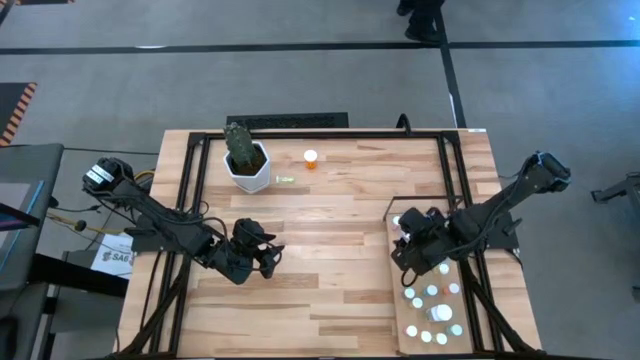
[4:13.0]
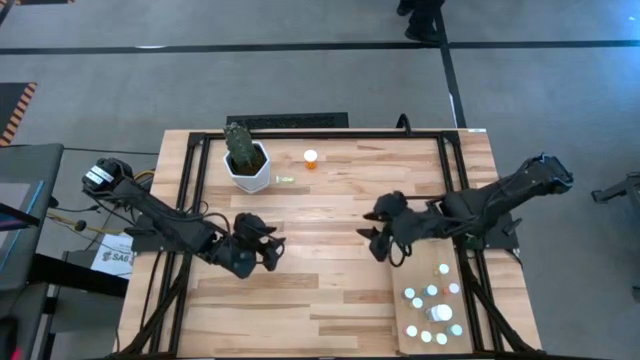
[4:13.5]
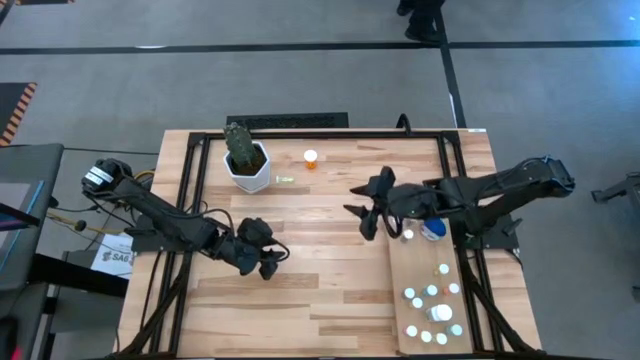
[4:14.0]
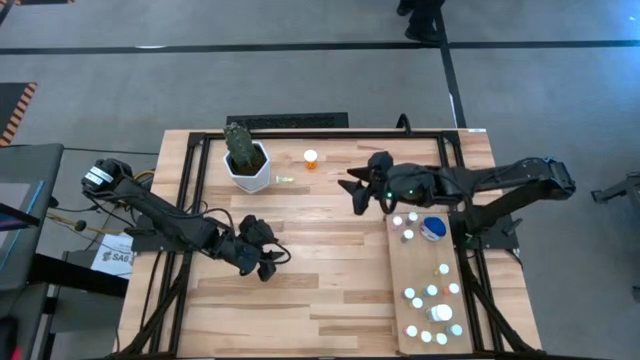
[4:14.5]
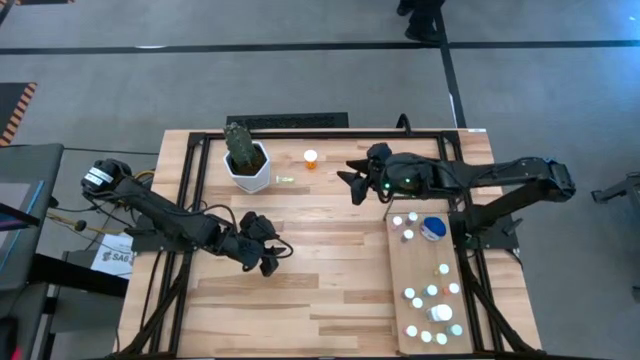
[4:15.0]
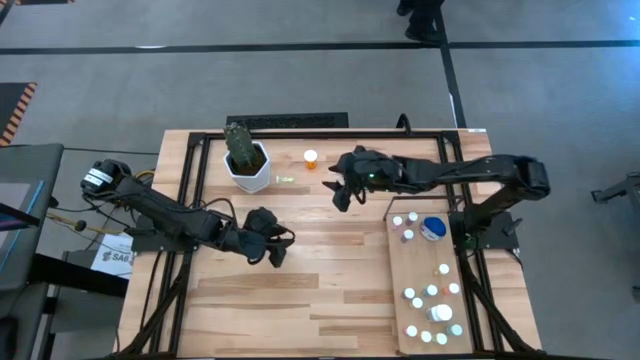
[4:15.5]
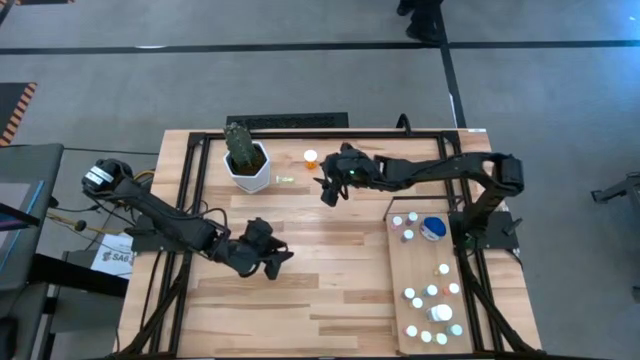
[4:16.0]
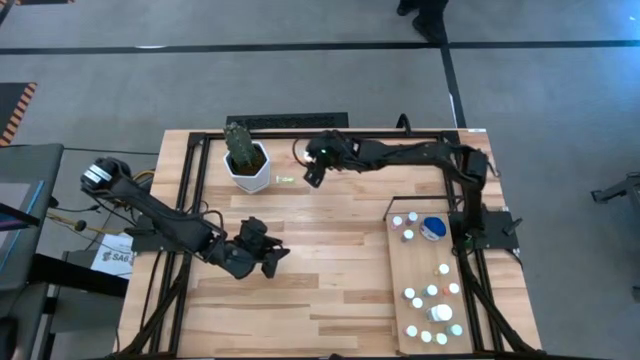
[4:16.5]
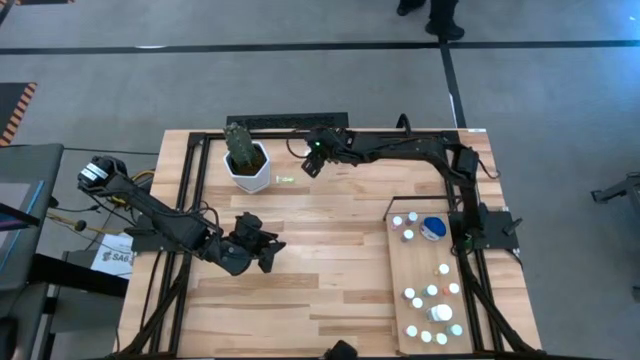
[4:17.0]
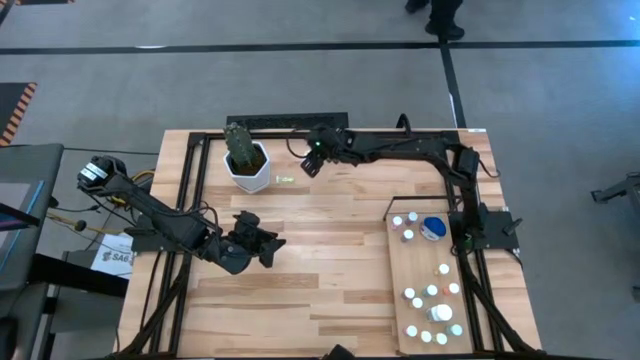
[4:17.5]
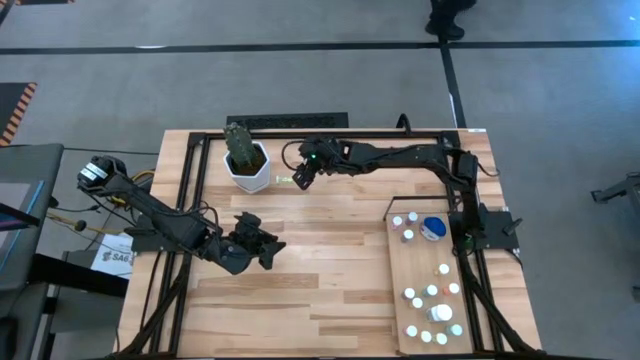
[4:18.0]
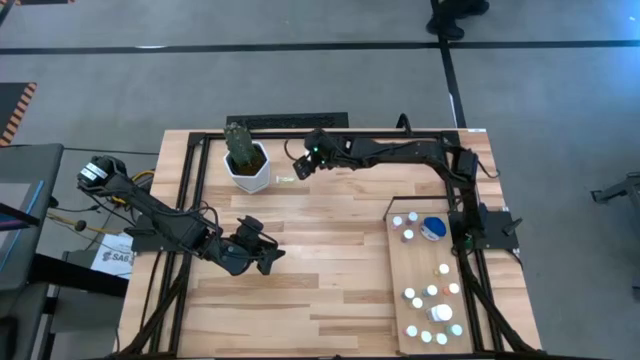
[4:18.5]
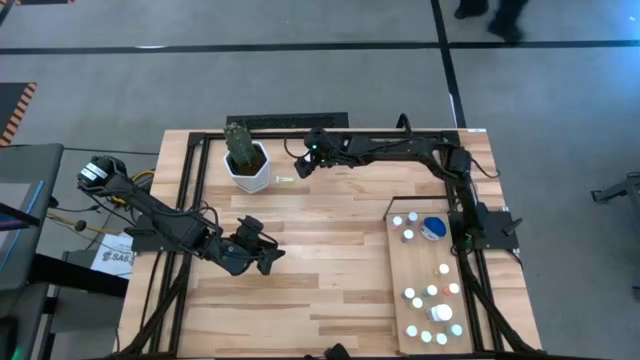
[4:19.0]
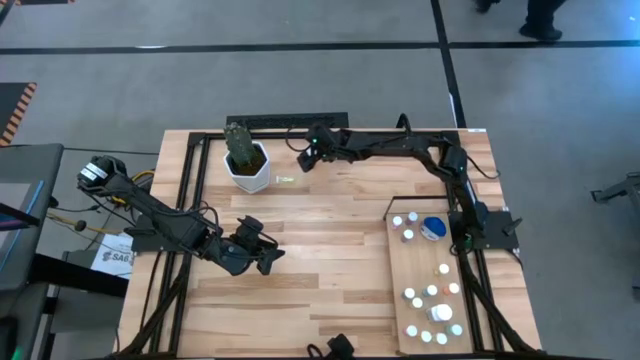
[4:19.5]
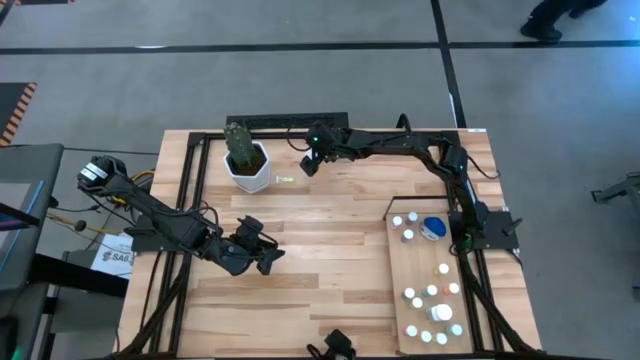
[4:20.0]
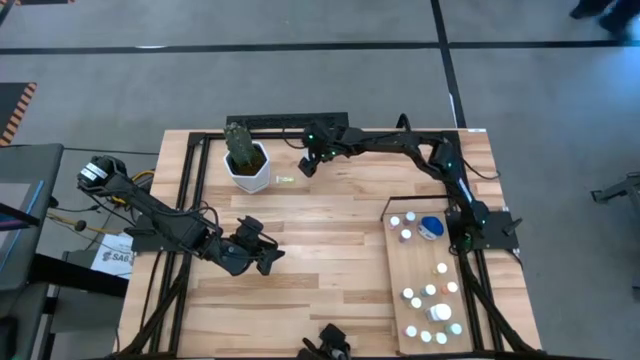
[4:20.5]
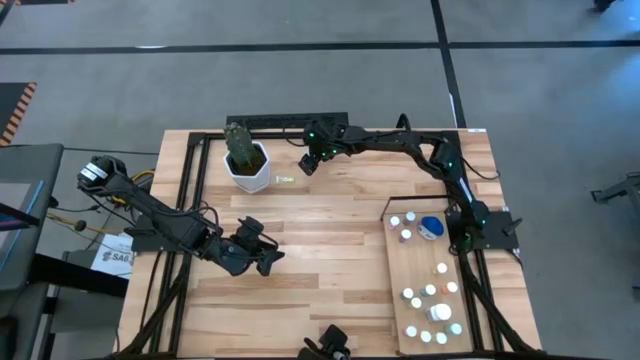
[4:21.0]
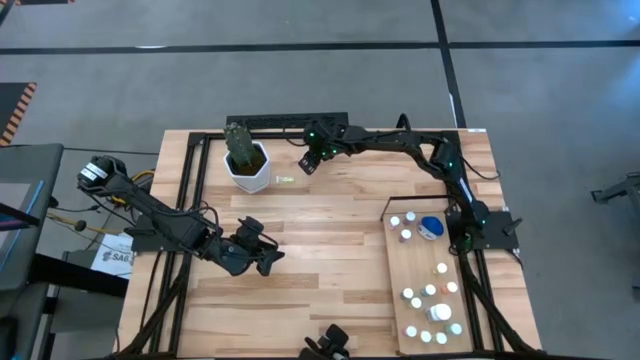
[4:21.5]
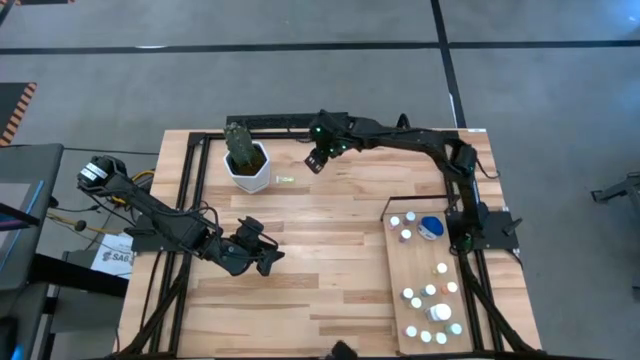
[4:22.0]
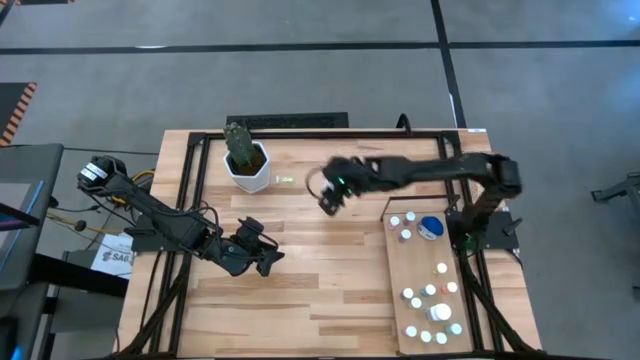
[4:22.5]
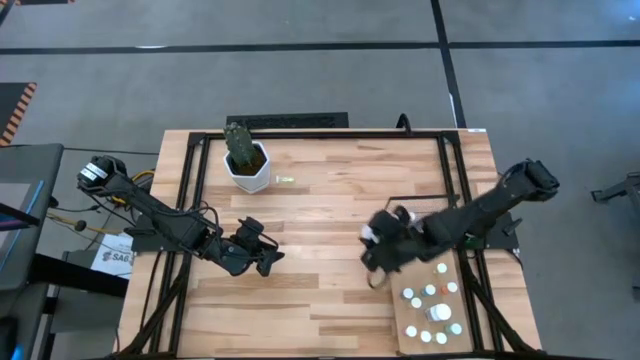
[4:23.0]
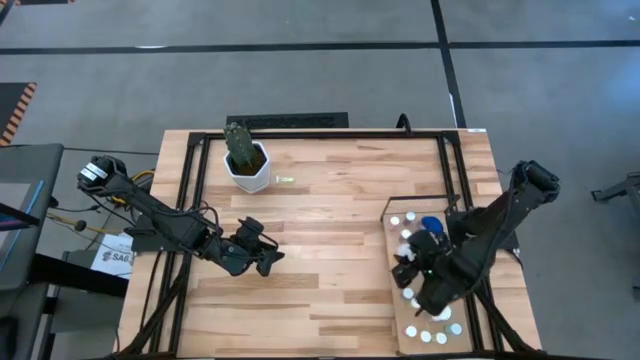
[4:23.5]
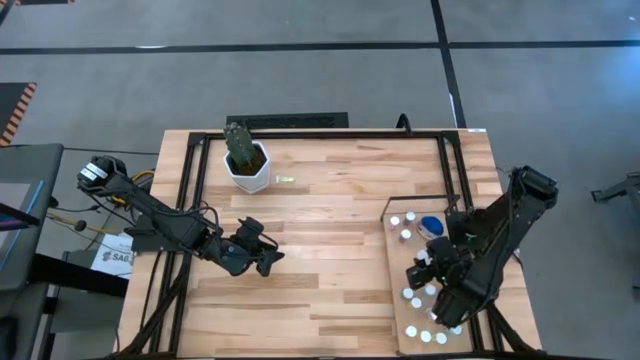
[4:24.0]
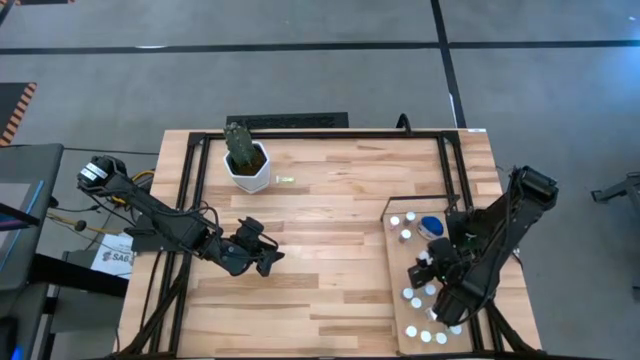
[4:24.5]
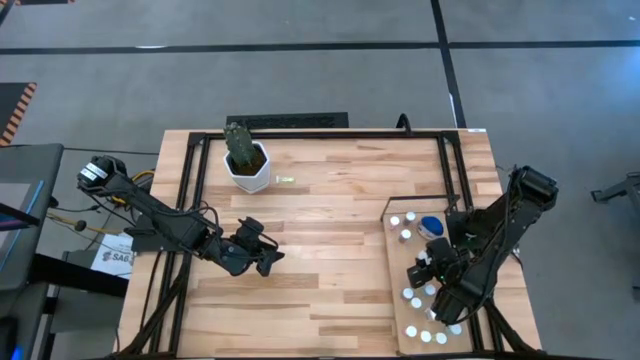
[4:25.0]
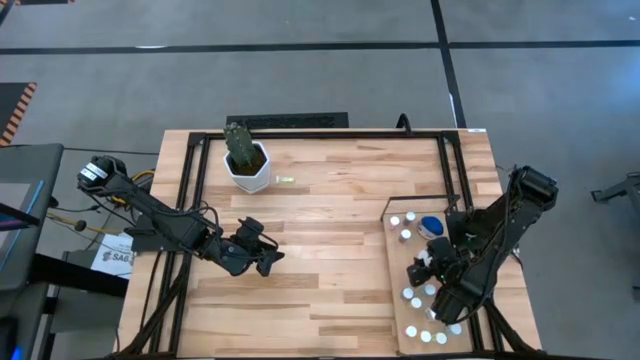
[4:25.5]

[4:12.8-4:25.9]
Task: Pick and place medicine bottles onto shelf by color
Put the orange pill bottle on the shelf

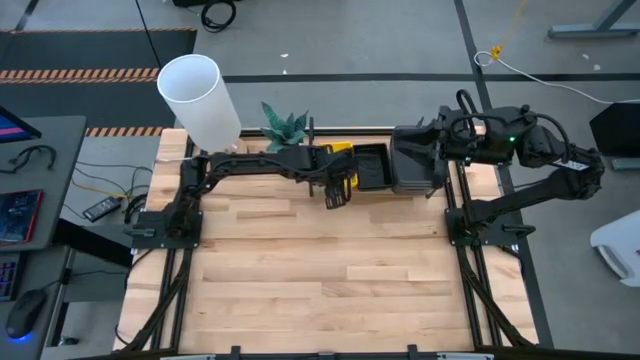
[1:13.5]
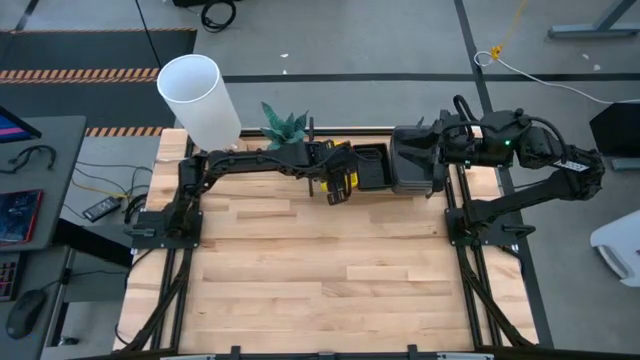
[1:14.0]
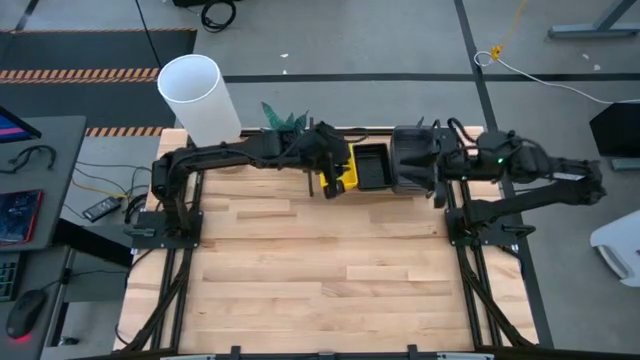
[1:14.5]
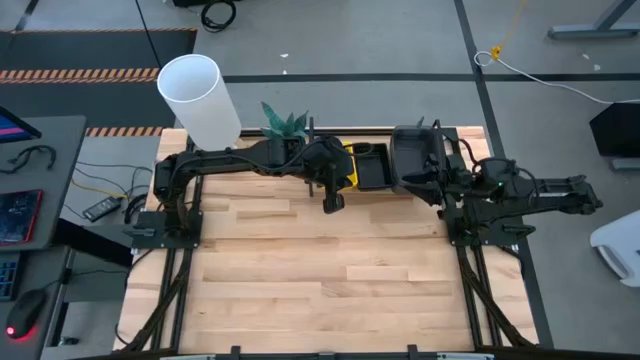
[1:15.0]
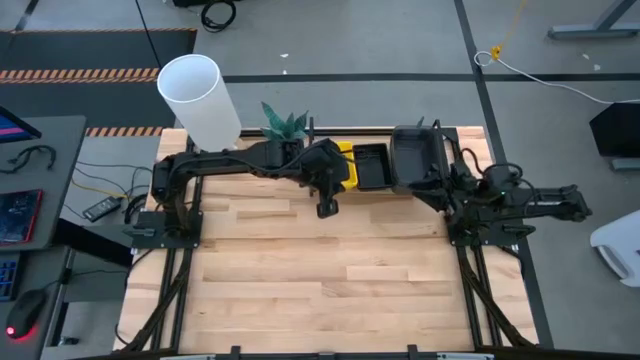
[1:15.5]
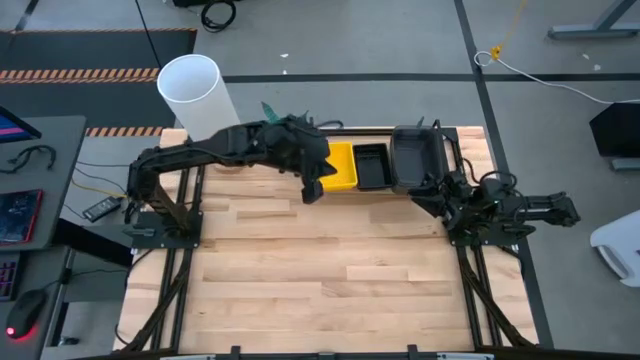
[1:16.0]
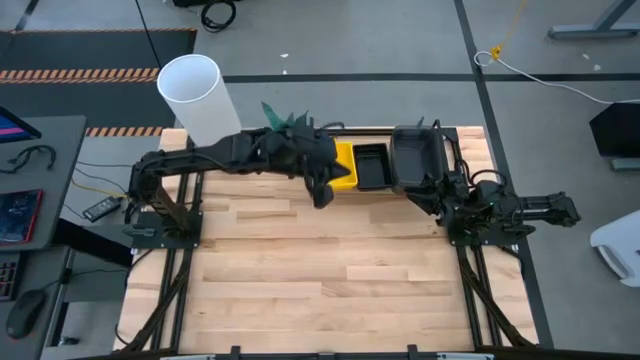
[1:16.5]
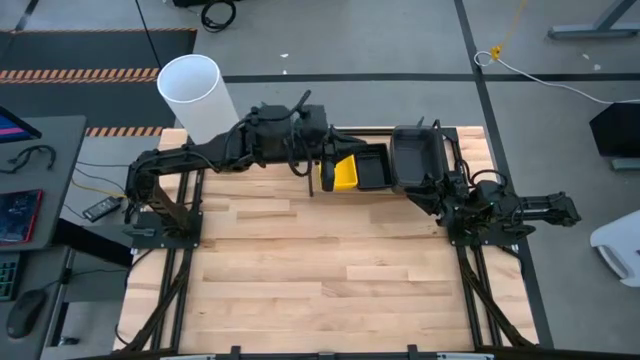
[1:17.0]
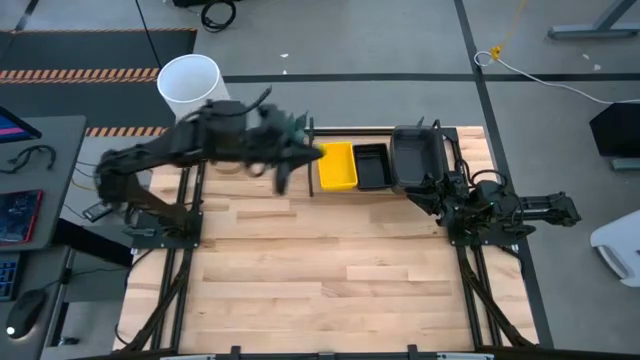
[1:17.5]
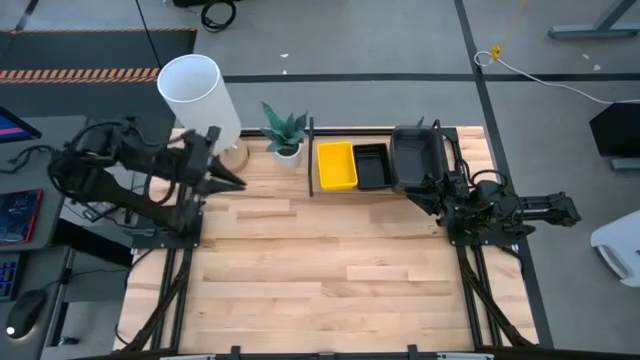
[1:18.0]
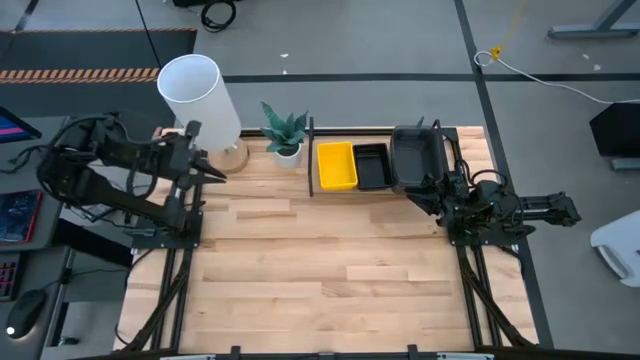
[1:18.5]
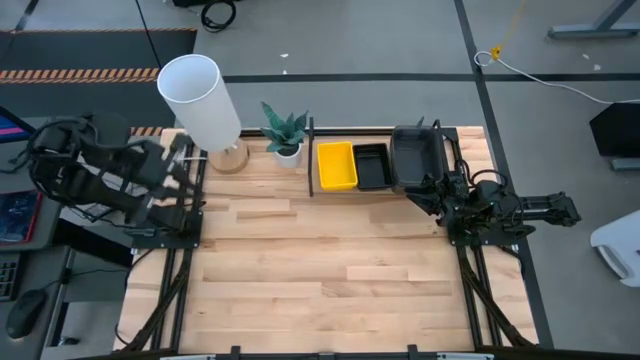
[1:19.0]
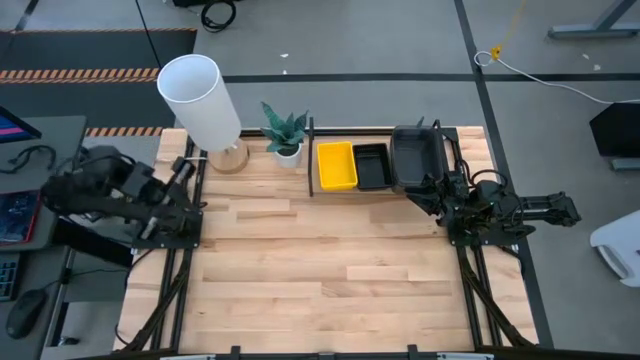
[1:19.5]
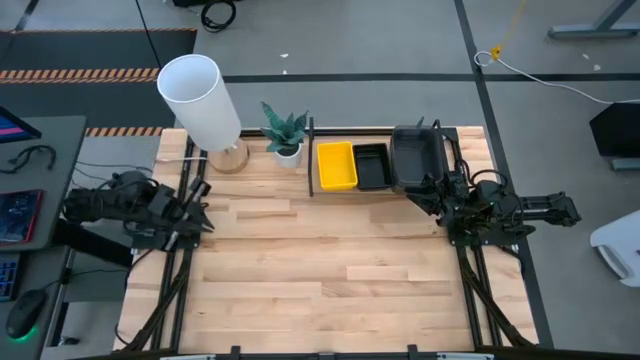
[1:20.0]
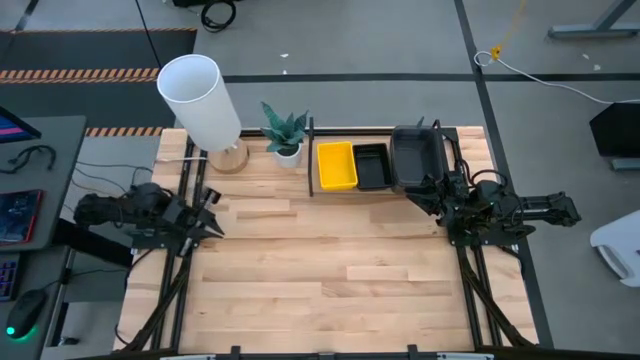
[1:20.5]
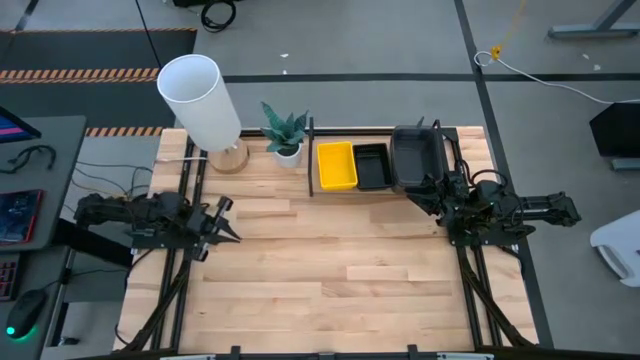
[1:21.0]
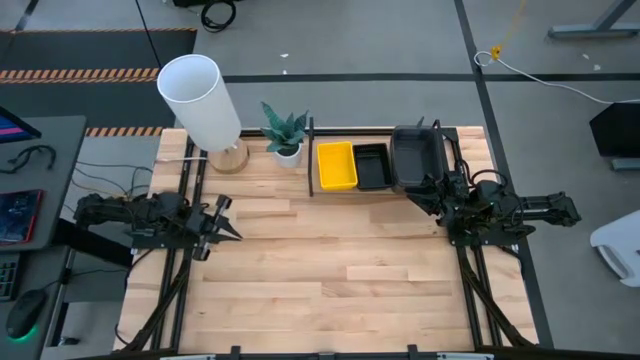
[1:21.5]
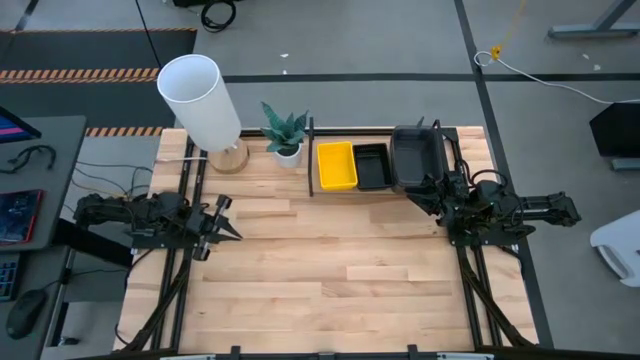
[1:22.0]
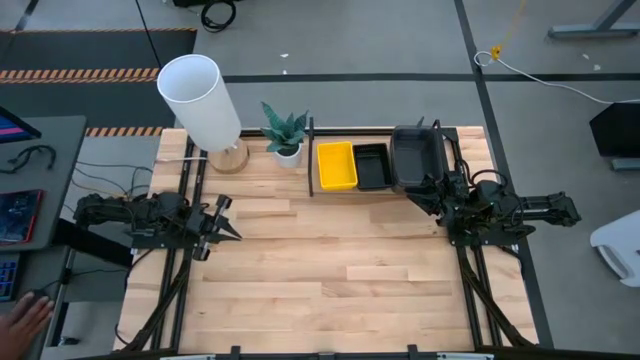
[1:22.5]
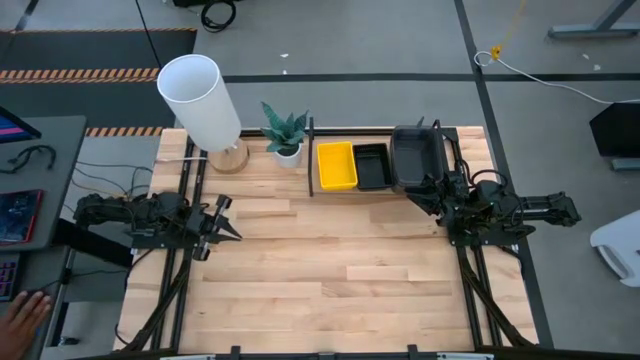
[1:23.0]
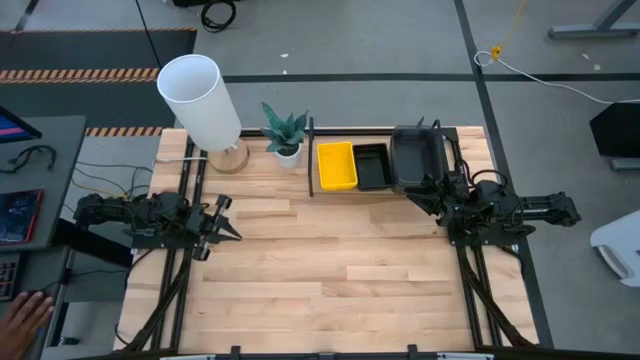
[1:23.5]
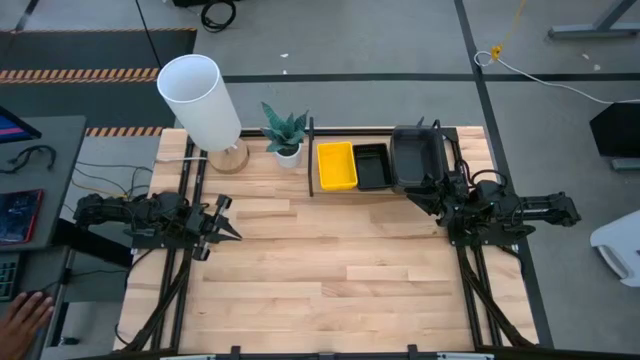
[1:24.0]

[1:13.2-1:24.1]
Task: Stack baskets on shelf by color
Return to Home Position
